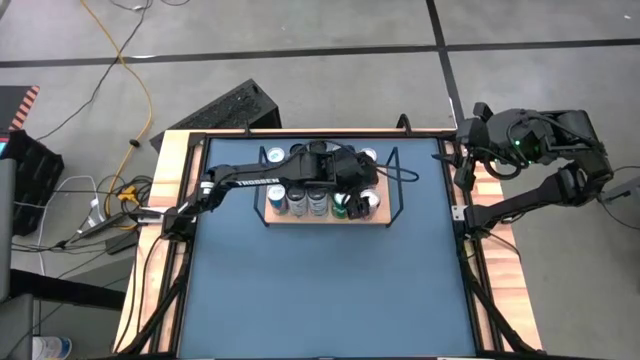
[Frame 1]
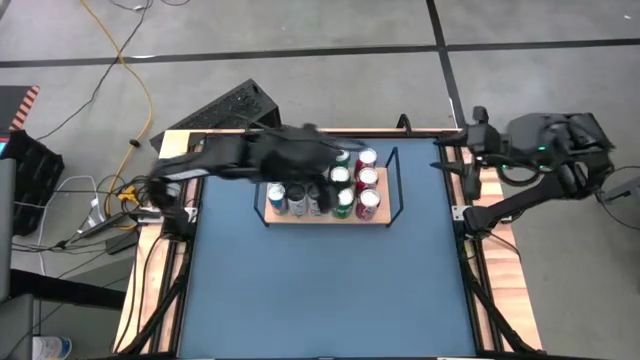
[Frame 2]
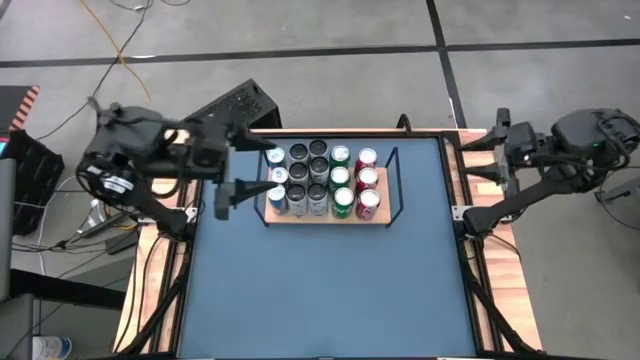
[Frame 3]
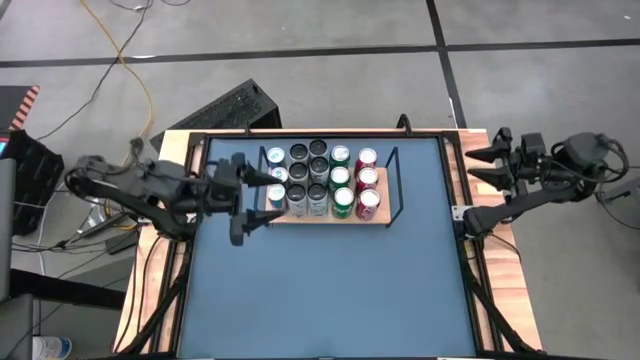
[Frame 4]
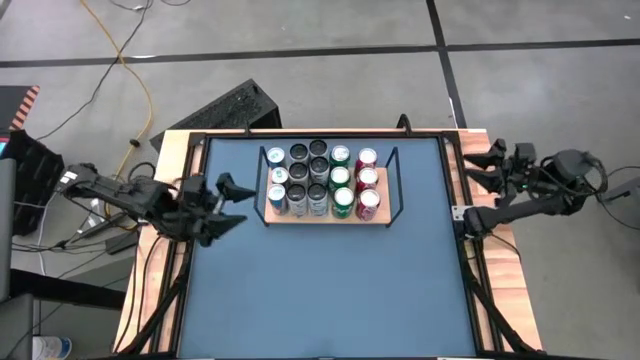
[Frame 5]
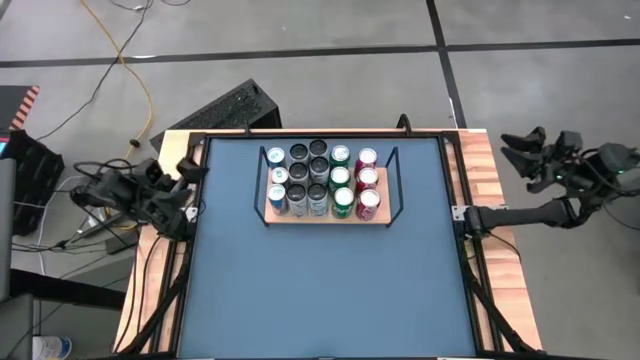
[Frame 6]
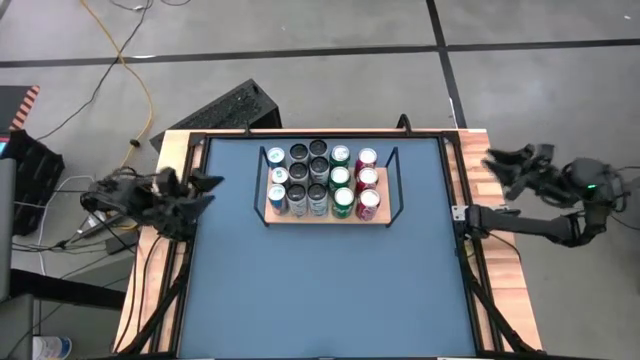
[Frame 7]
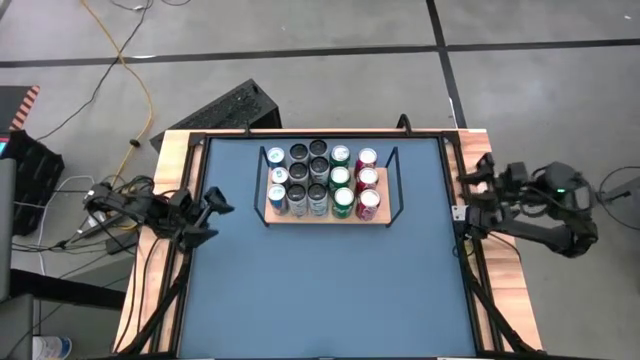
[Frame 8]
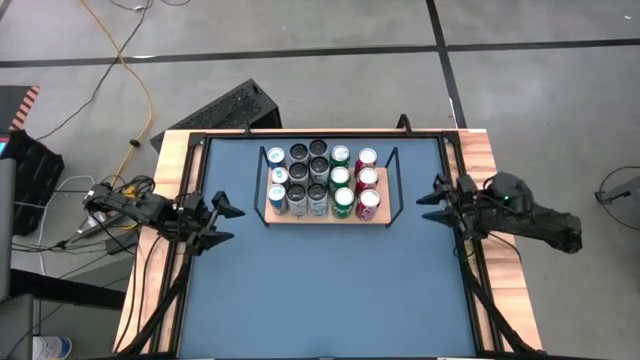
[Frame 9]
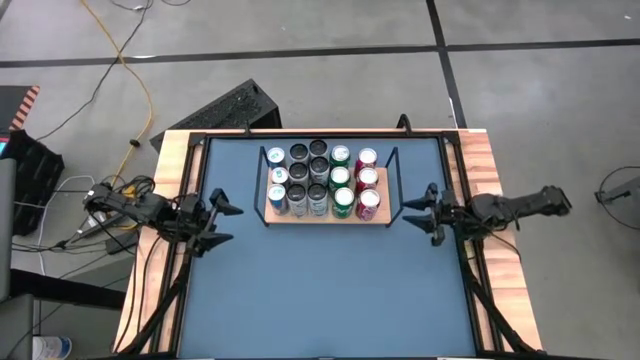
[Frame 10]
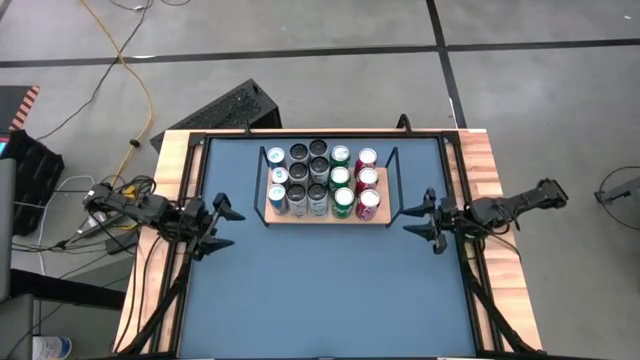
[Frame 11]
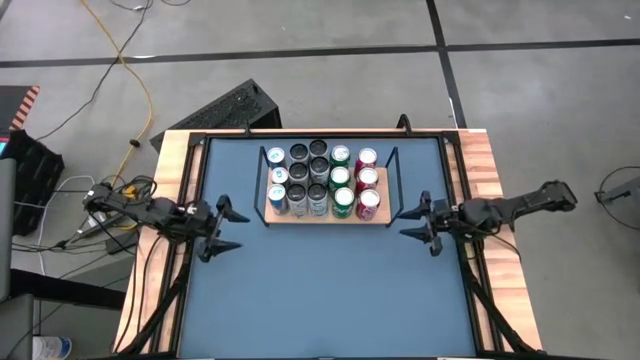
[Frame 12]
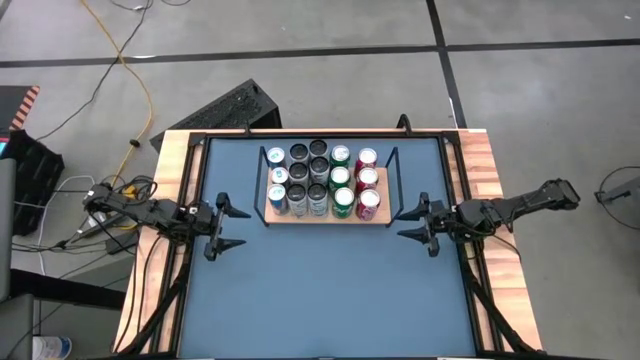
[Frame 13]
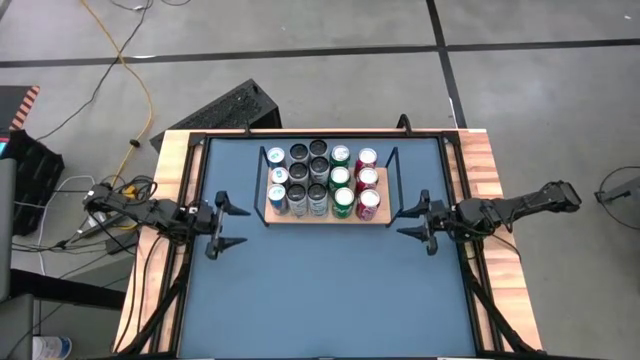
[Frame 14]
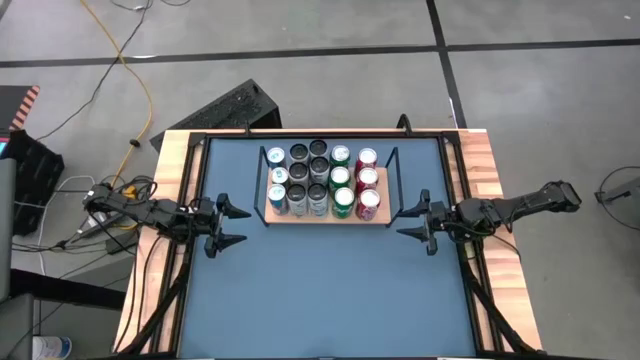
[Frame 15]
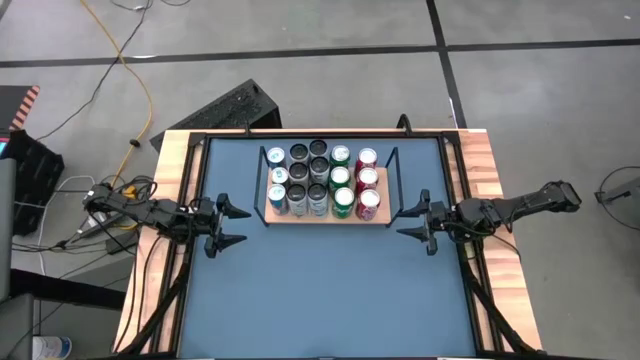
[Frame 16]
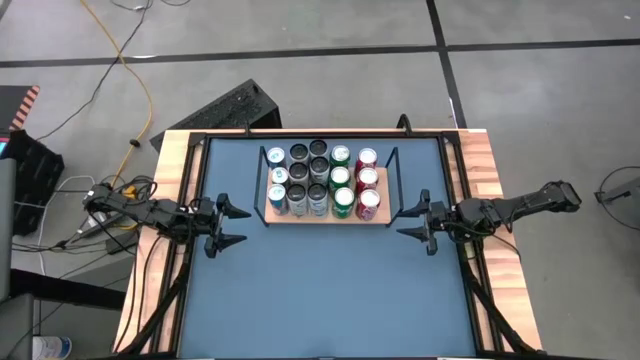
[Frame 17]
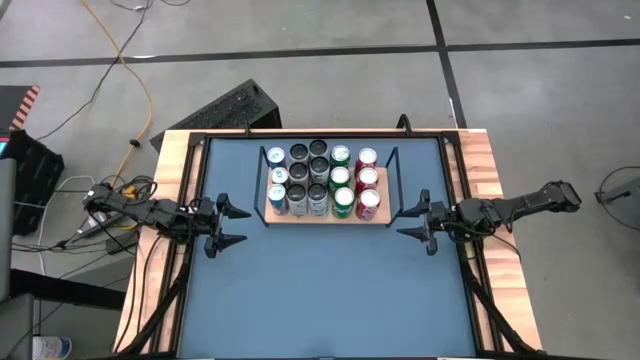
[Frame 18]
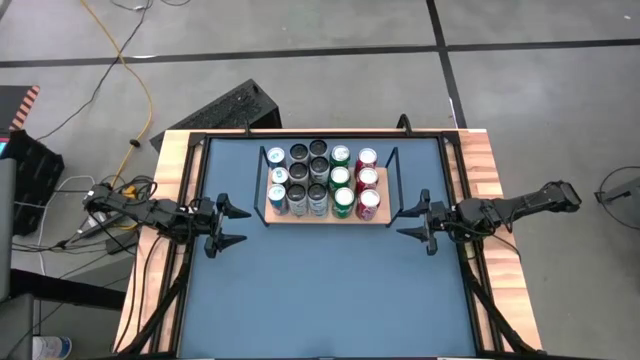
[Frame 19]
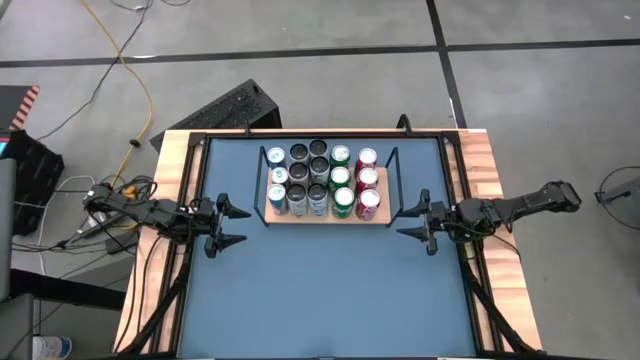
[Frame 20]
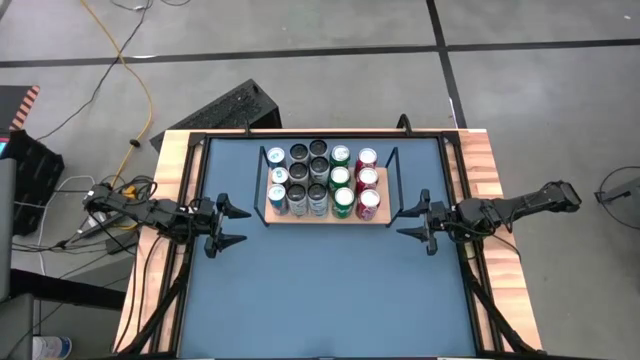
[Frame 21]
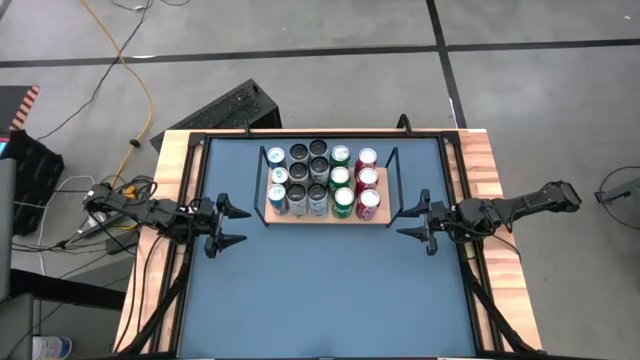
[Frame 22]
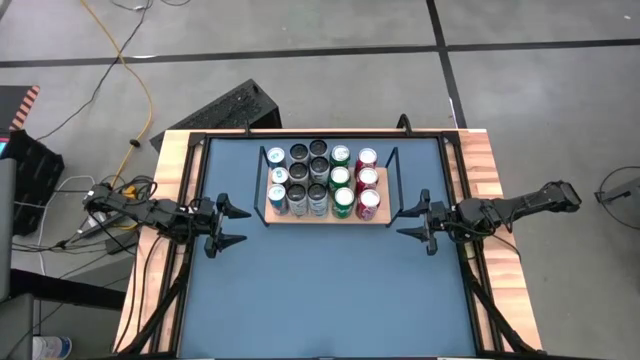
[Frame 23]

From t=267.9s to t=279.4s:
Task: Place canned beverage on shelf
Return to Home Position
